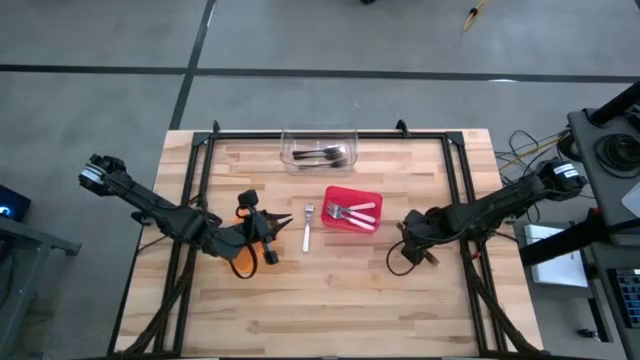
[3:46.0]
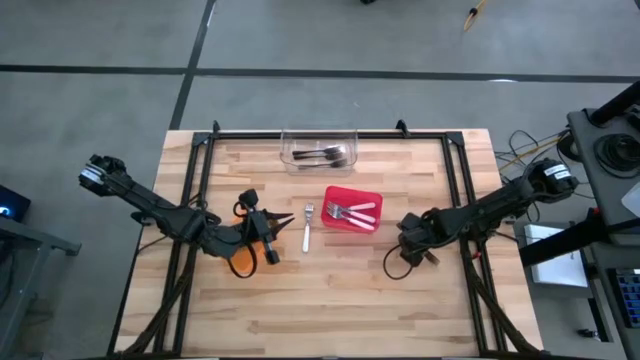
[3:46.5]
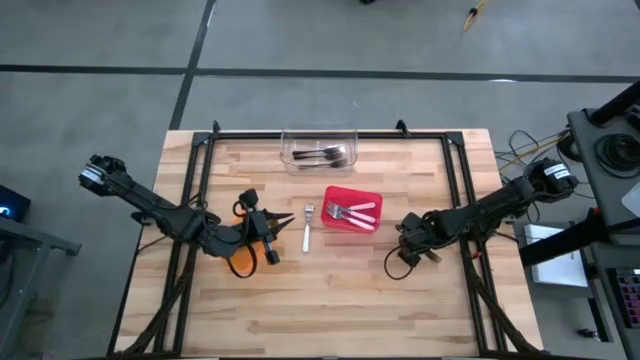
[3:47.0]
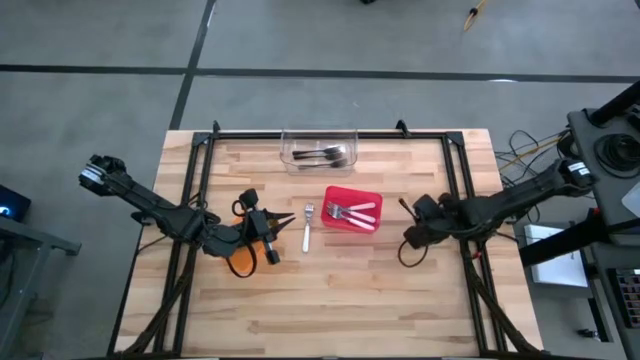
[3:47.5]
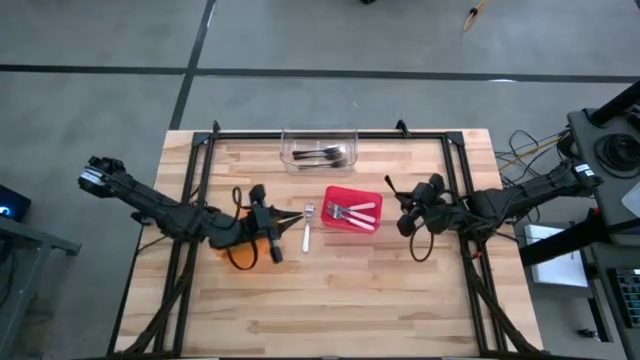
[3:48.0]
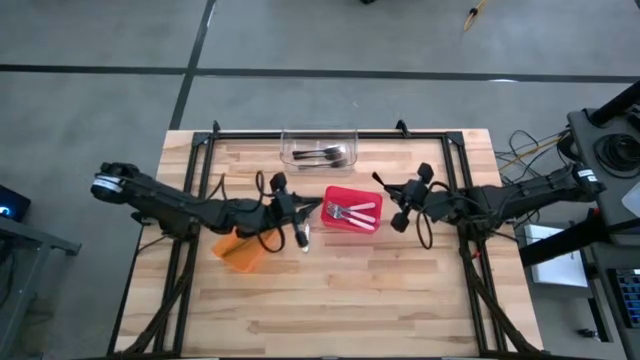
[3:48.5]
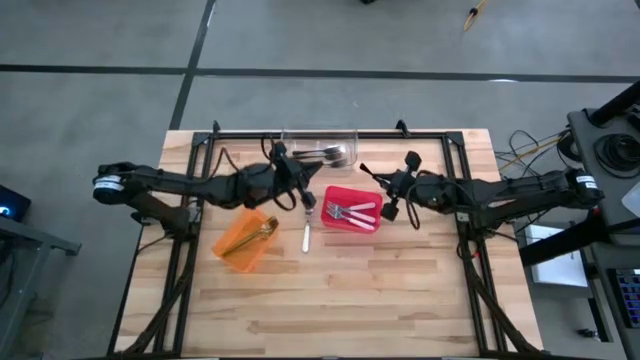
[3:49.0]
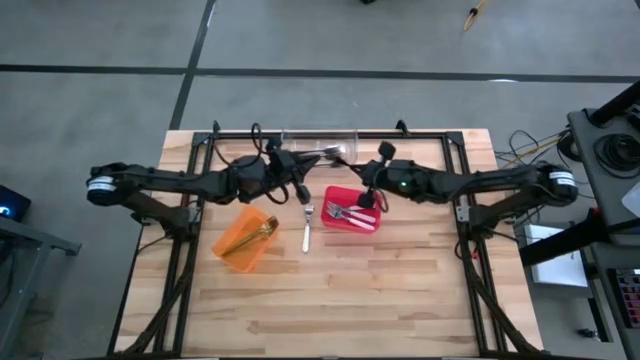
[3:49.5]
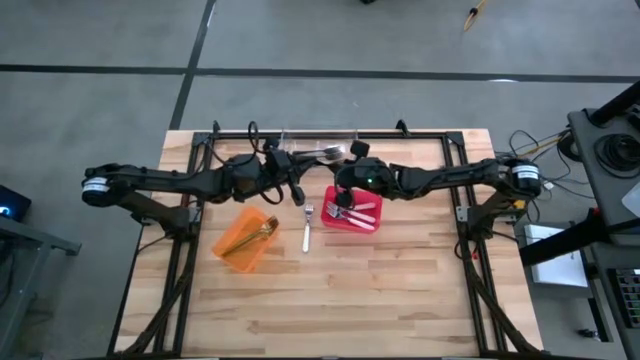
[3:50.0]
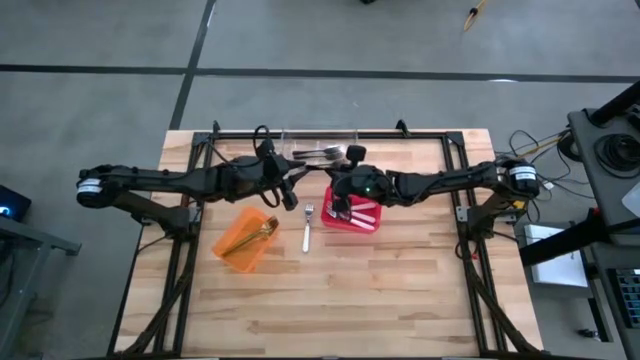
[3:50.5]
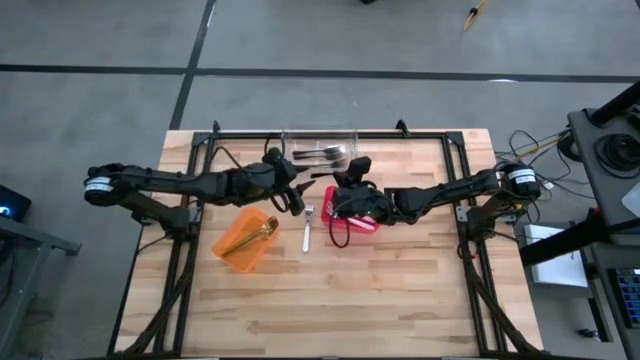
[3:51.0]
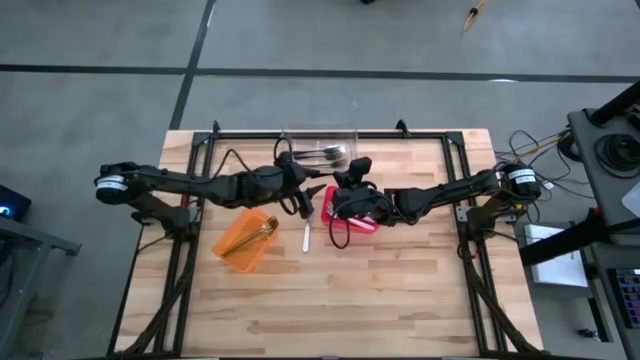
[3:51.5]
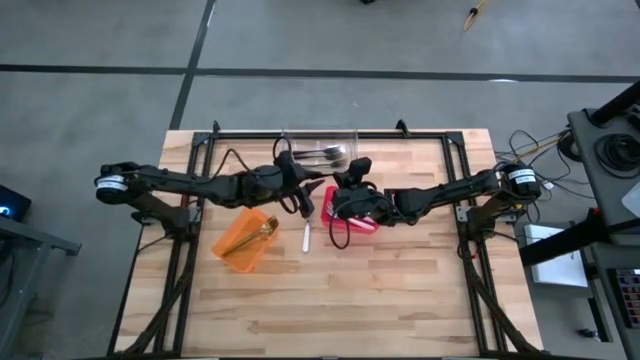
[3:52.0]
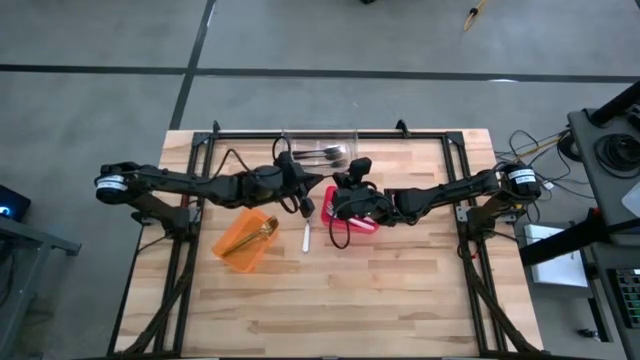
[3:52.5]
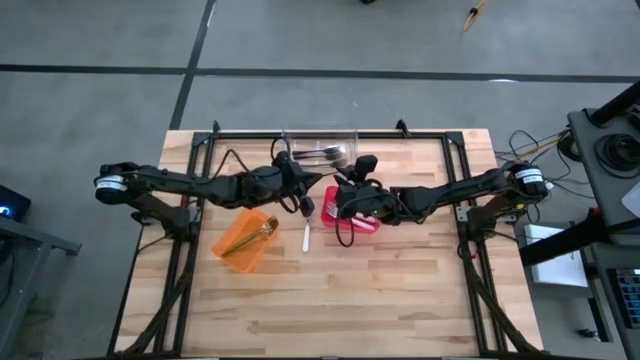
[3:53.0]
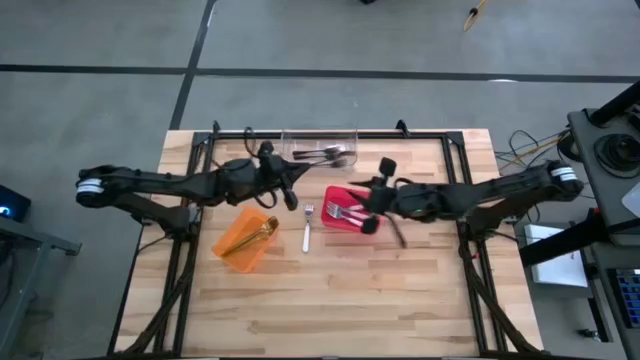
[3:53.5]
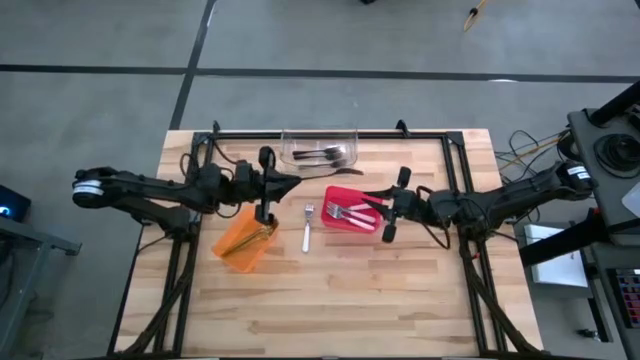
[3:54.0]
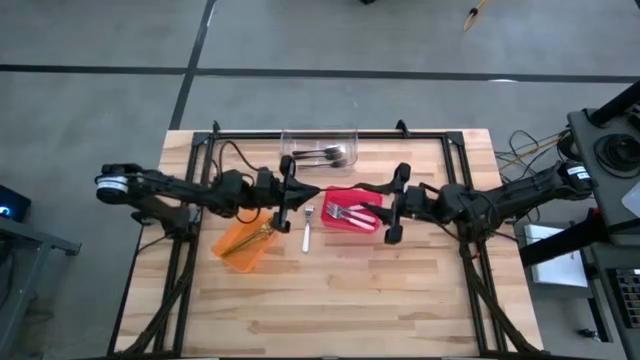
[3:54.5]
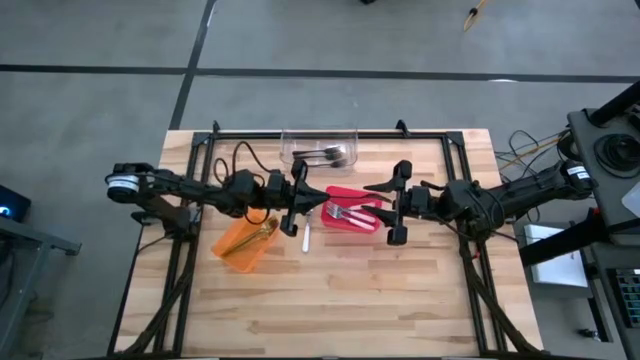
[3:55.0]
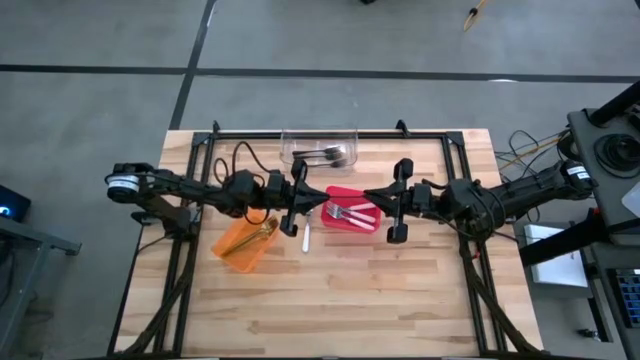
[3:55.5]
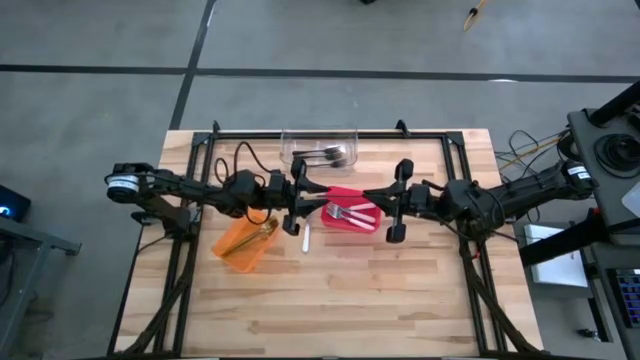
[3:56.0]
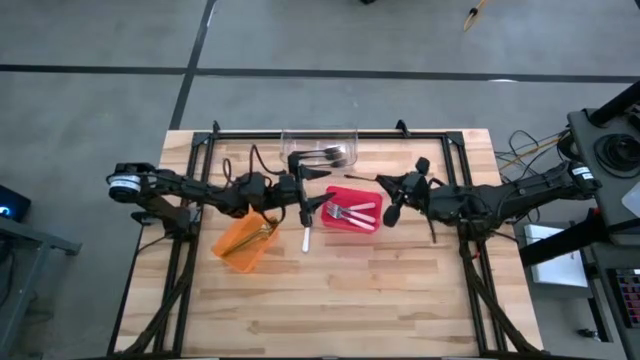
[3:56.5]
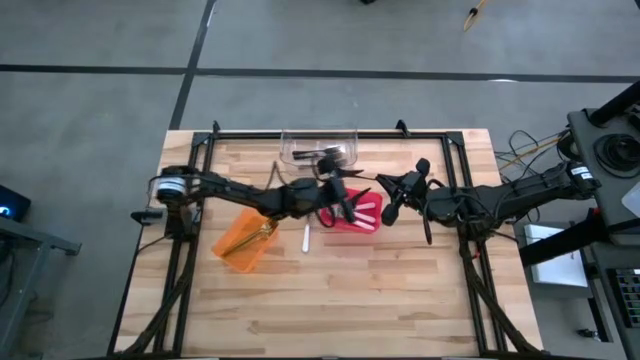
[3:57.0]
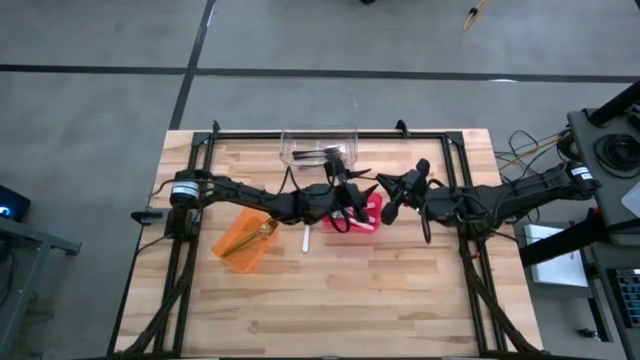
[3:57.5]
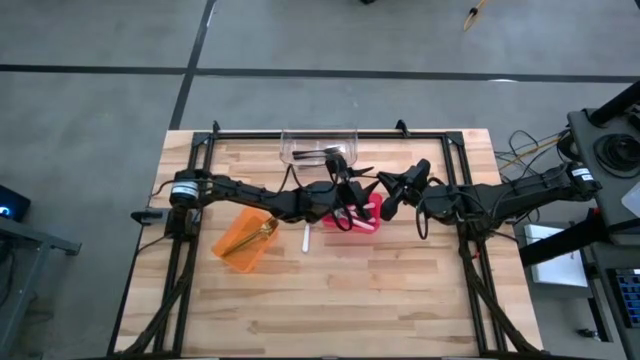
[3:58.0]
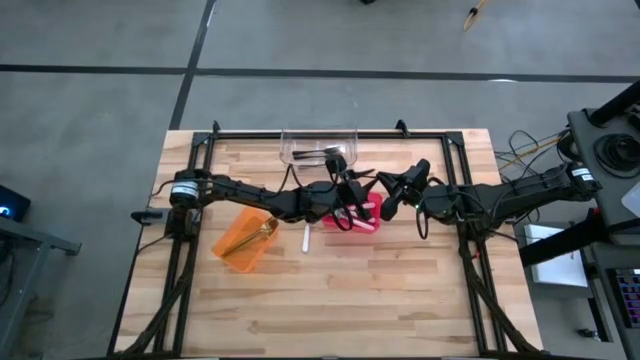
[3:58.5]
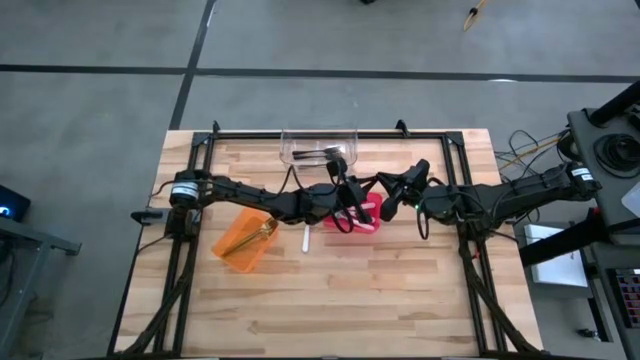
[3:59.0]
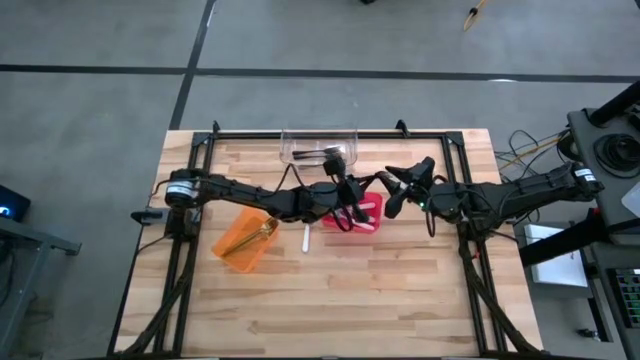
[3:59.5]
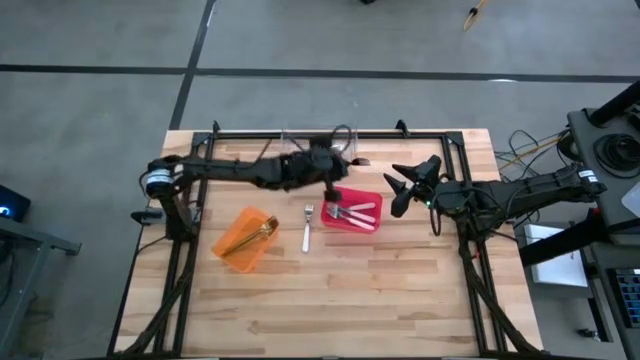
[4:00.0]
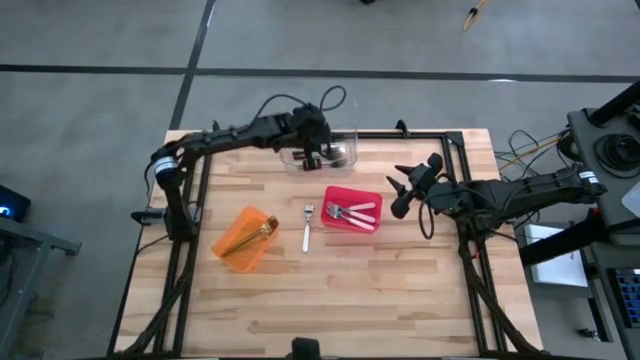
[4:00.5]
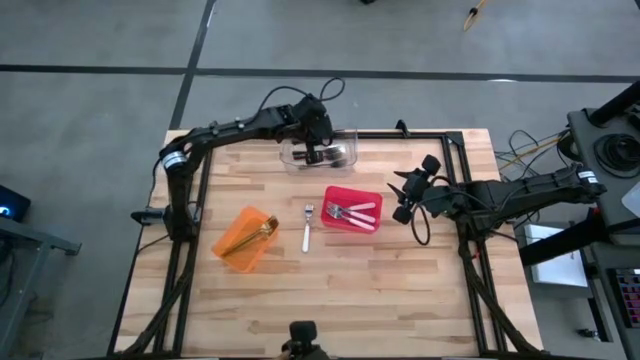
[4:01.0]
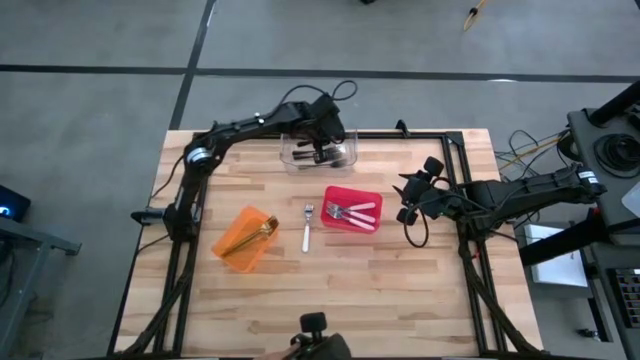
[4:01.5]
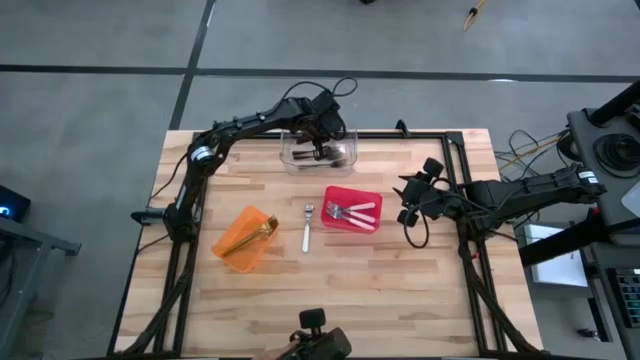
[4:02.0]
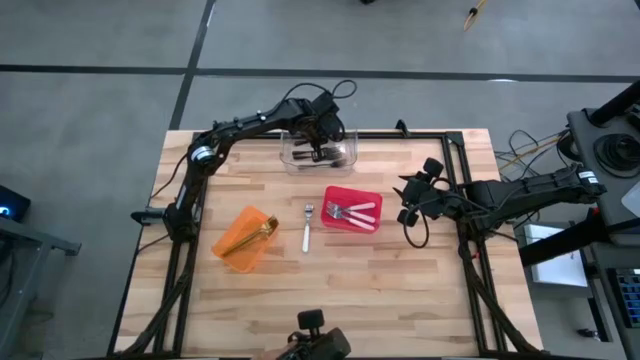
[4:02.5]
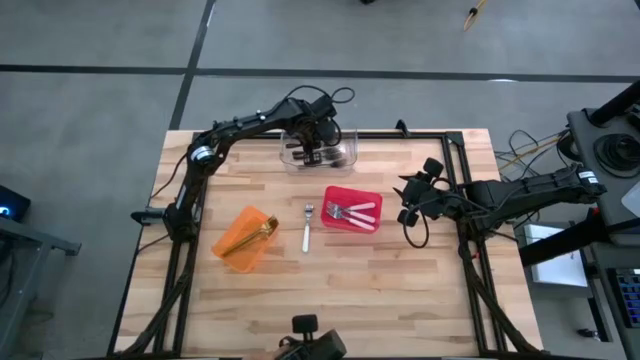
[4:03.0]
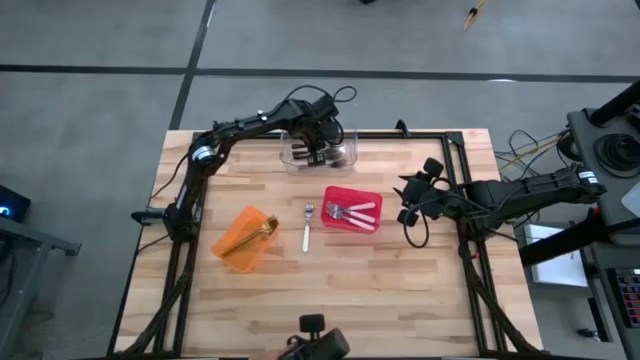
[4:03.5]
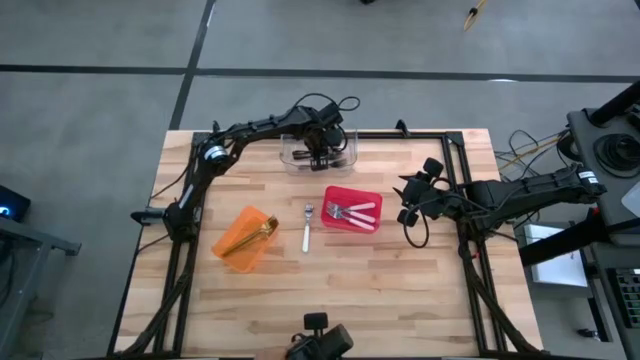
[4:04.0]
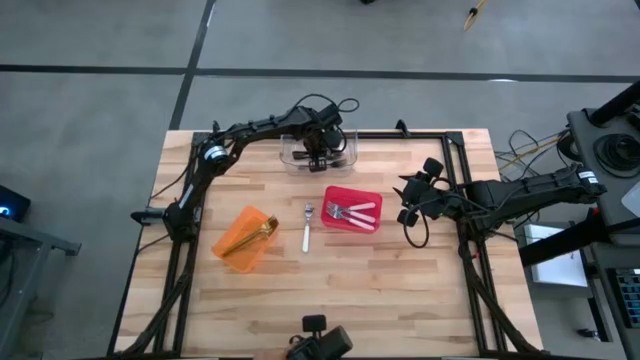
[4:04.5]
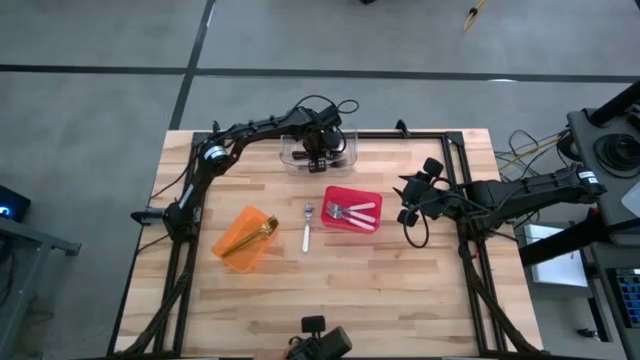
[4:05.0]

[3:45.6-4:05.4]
Task: Sort silverware by color (type)
Put the black fork into the transparent bin
